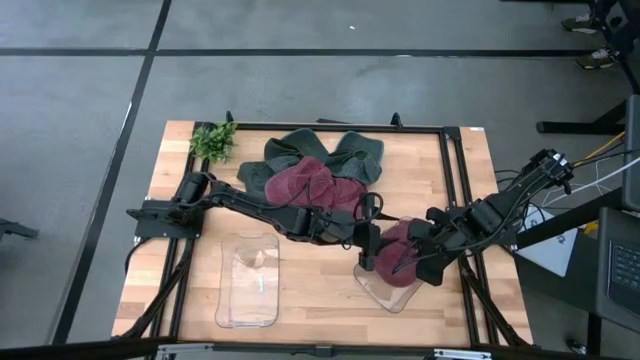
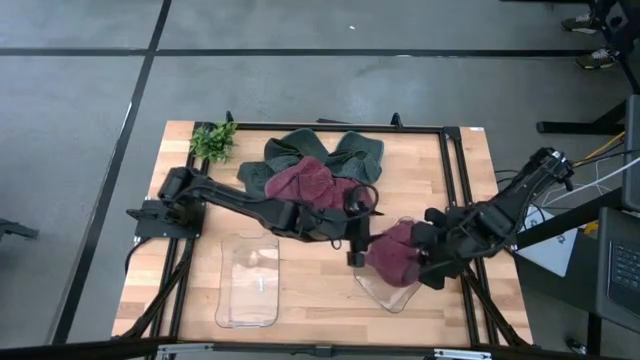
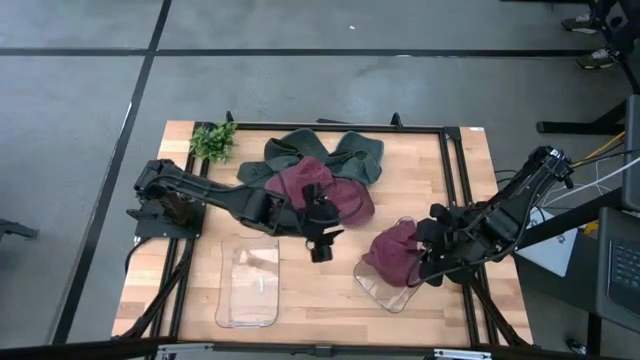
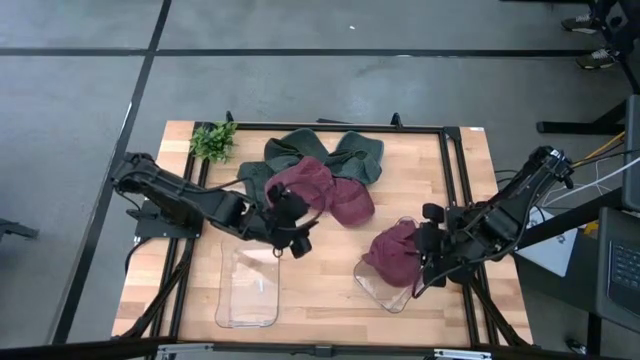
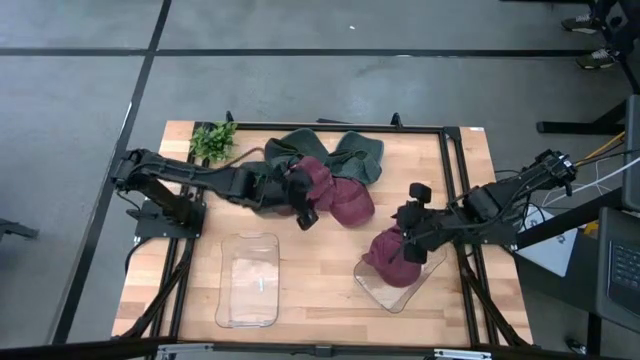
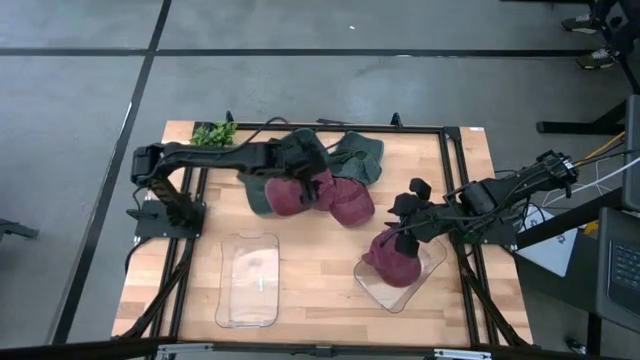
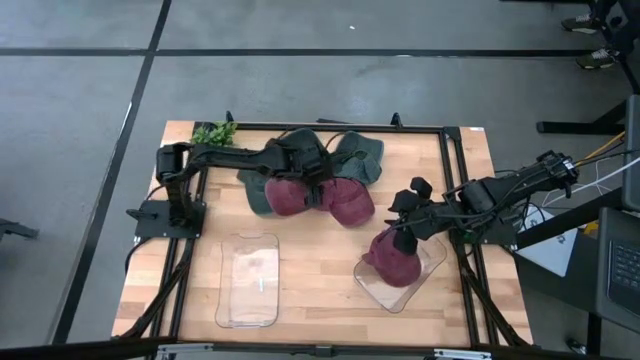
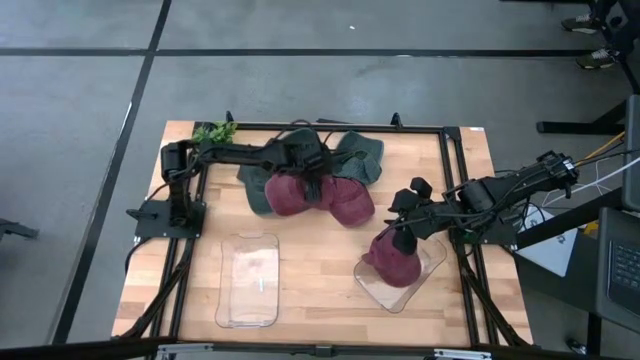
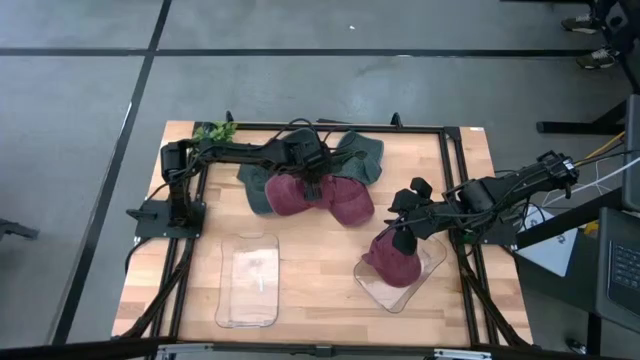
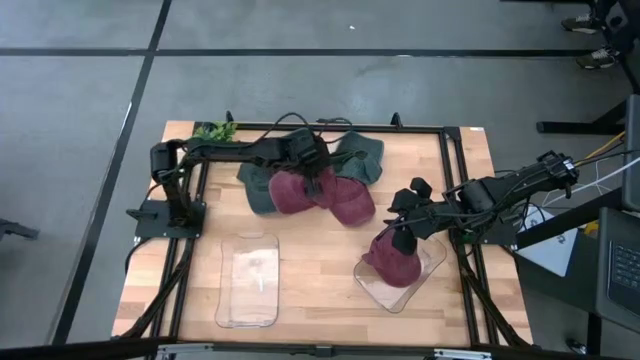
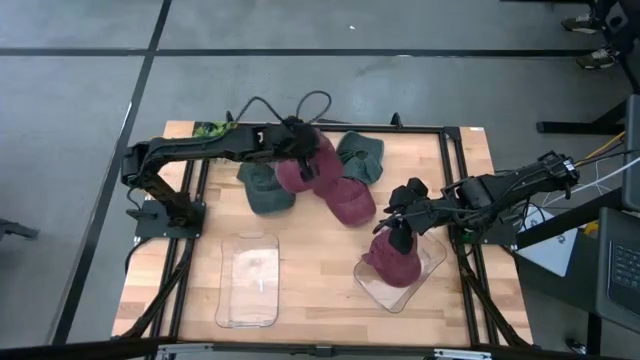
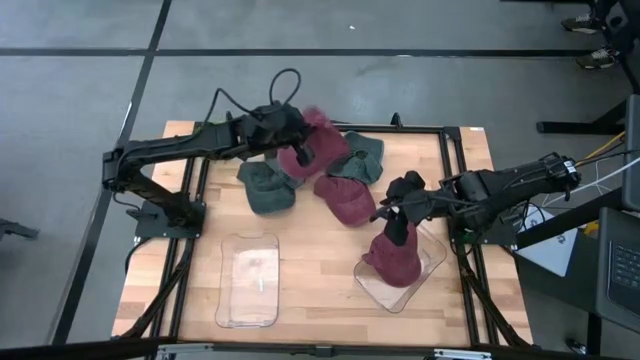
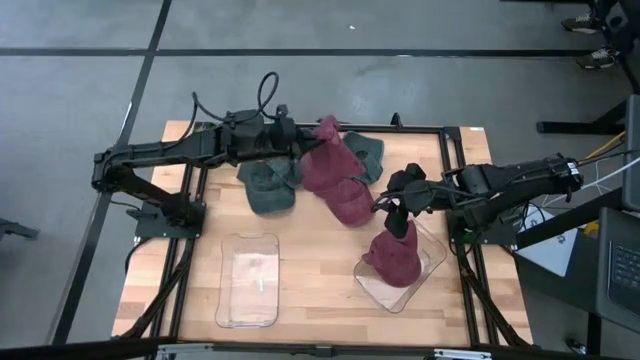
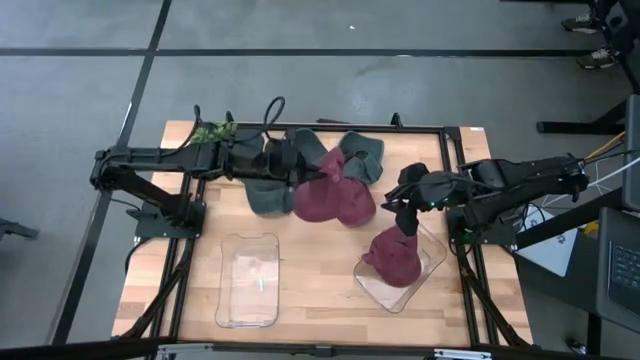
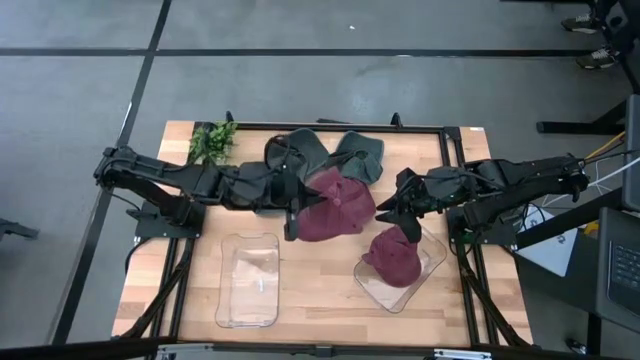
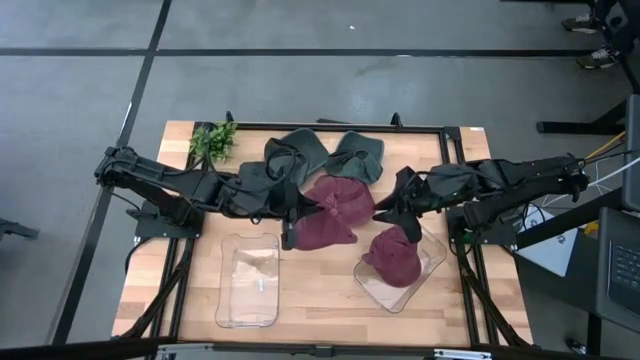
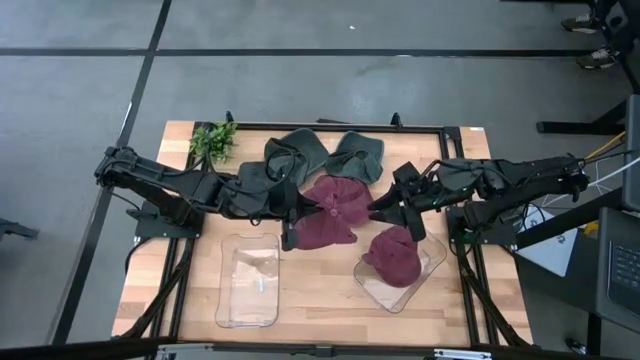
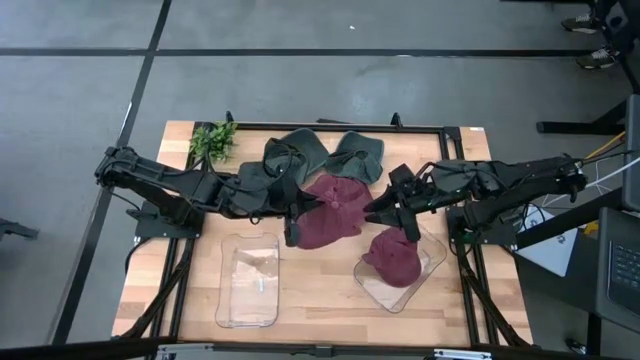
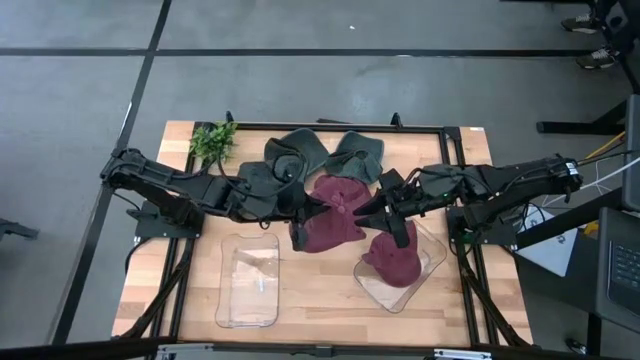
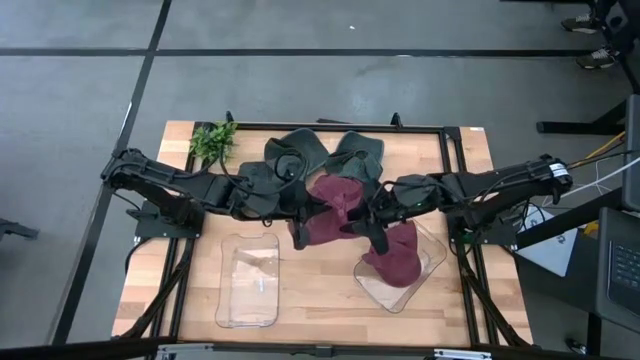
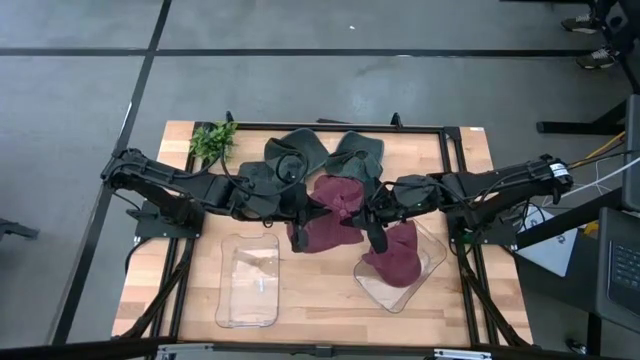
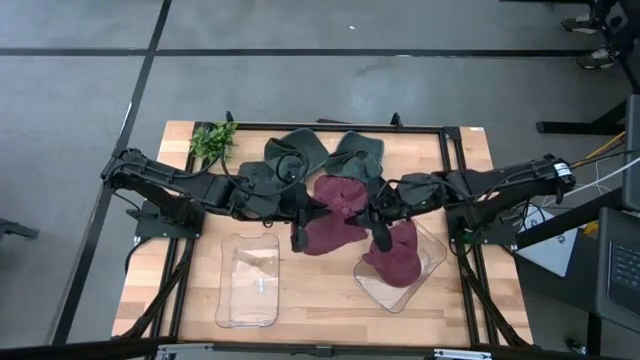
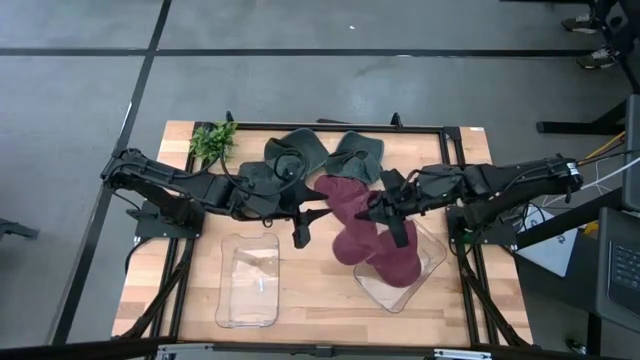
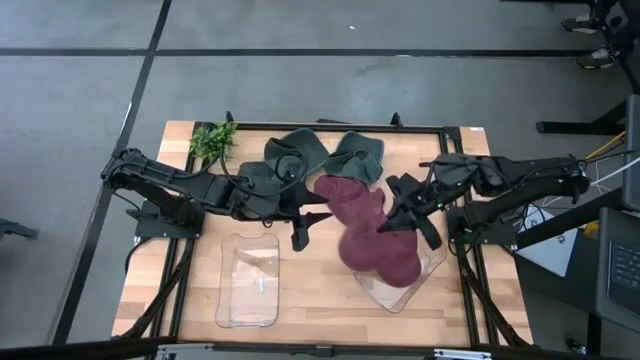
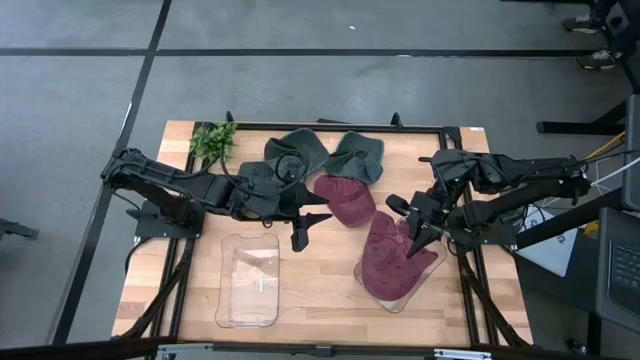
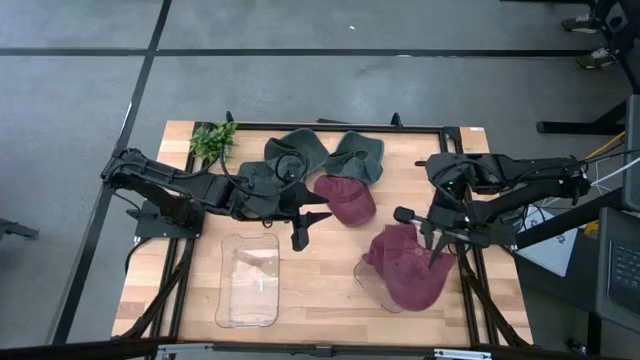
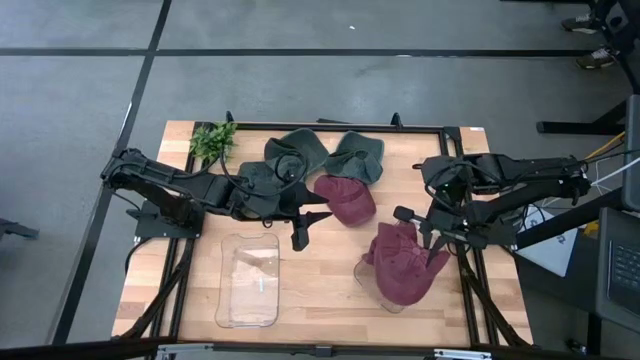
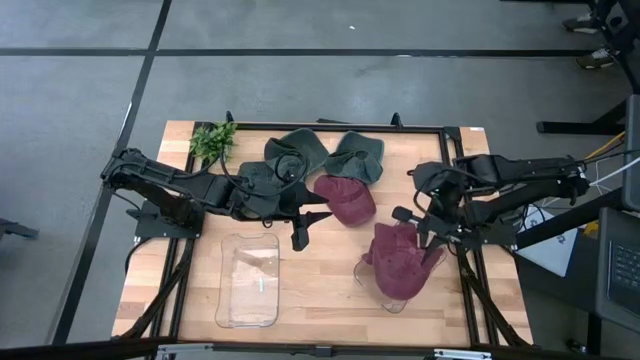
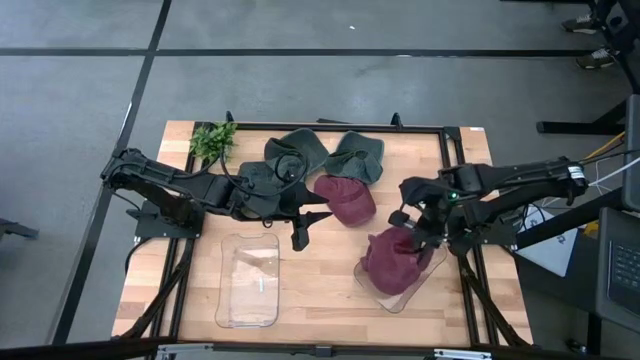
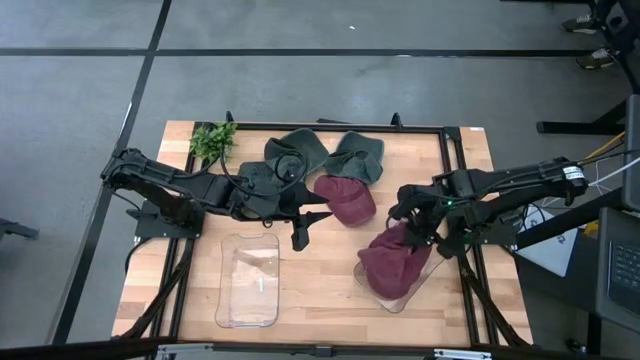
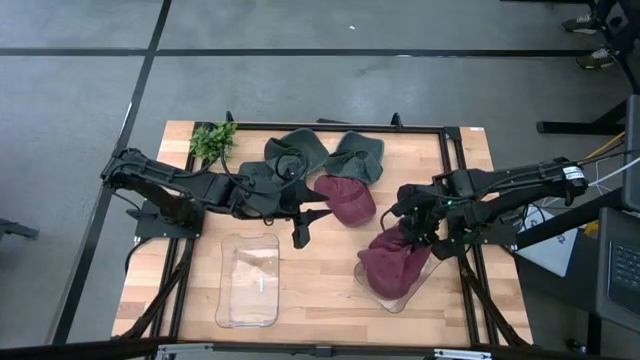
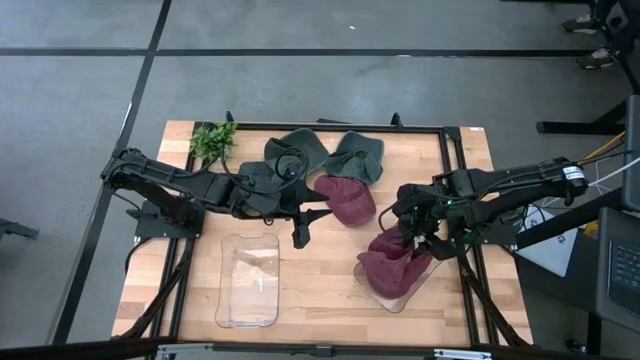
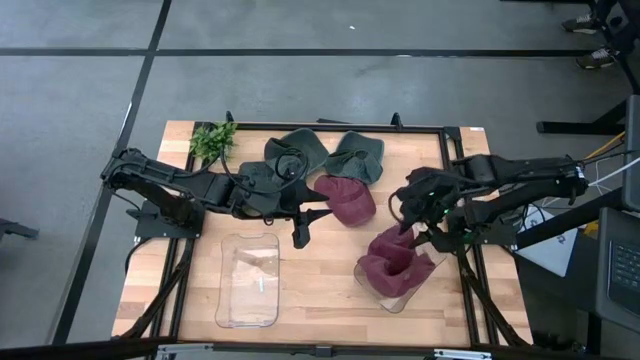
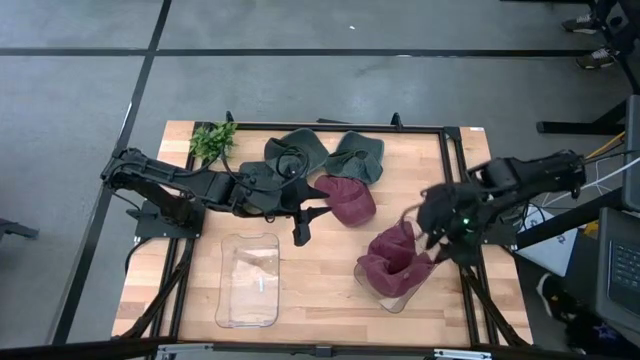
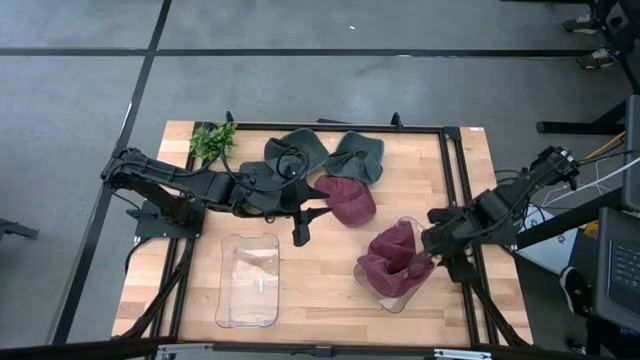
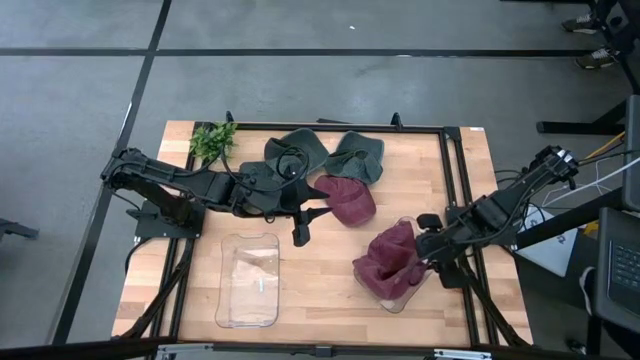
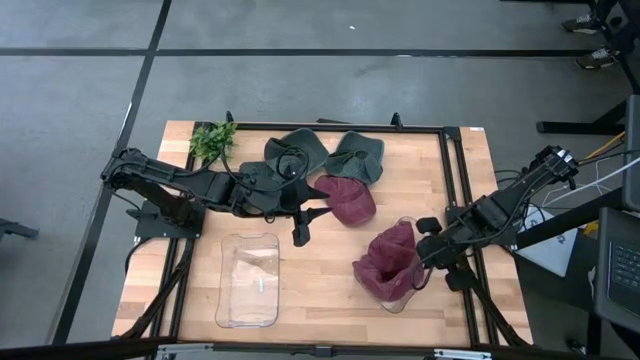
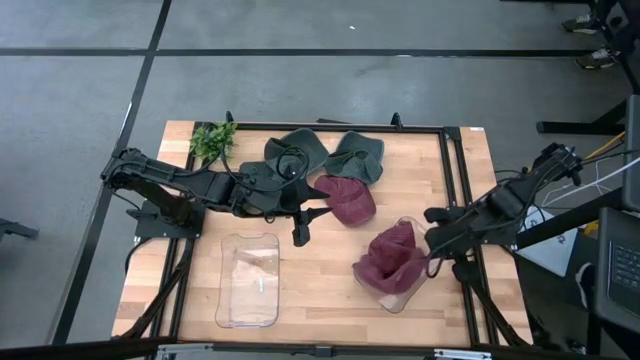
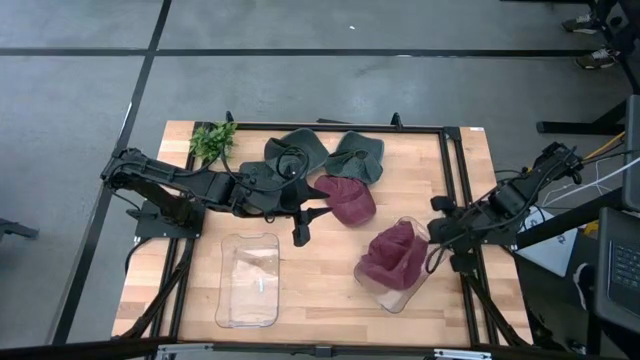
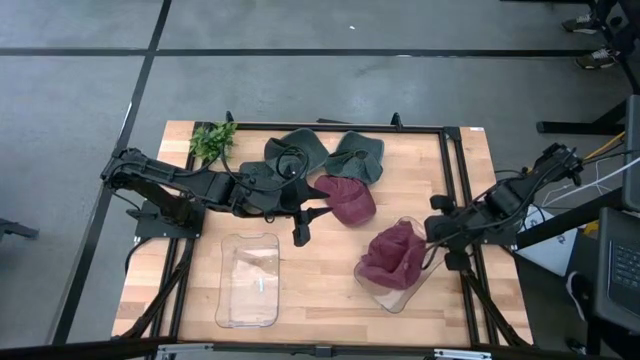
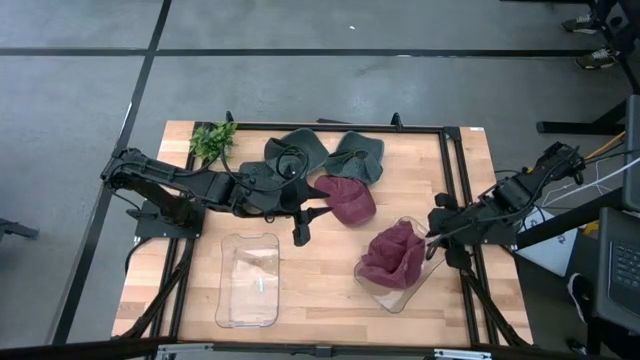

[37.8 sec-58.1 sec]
Task: Pick & Place hat
Put the left red cap into the right transparent bin
